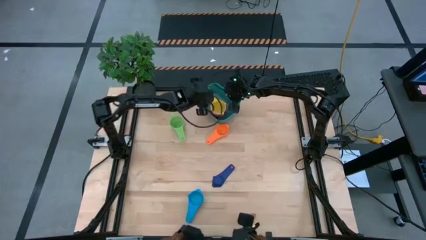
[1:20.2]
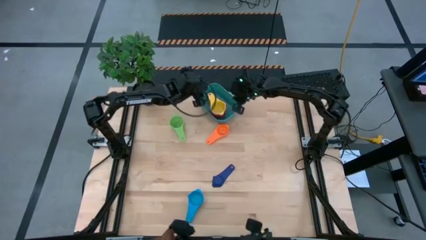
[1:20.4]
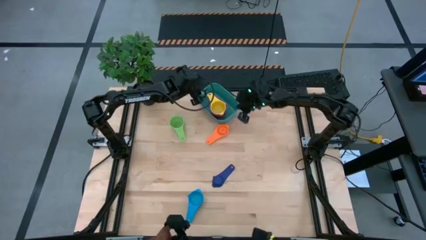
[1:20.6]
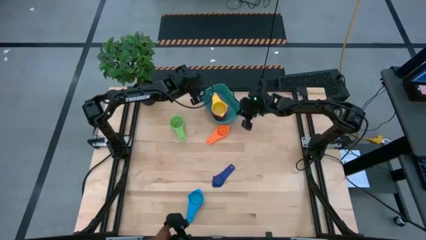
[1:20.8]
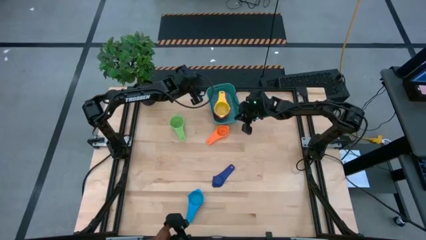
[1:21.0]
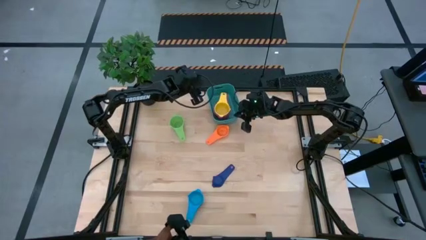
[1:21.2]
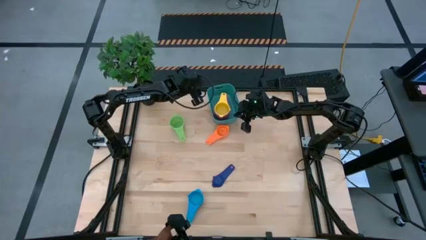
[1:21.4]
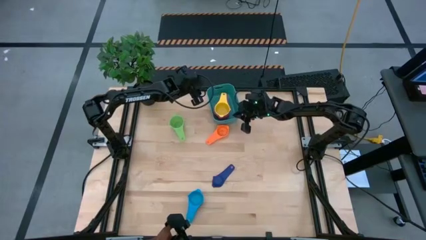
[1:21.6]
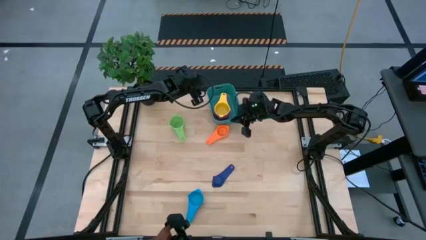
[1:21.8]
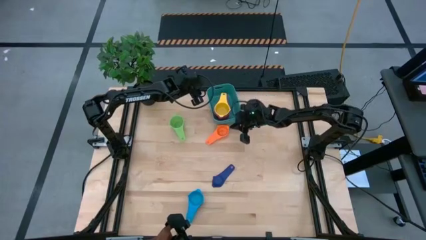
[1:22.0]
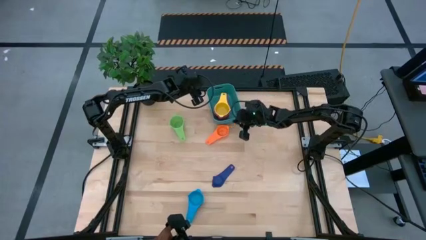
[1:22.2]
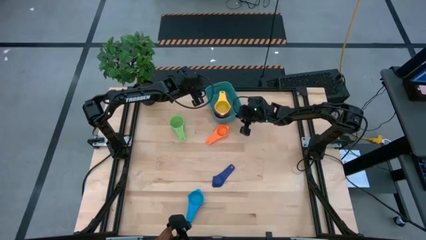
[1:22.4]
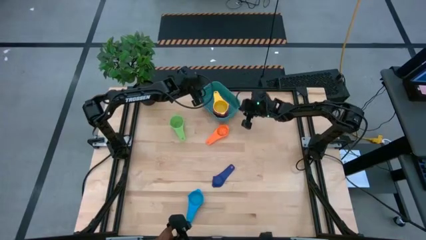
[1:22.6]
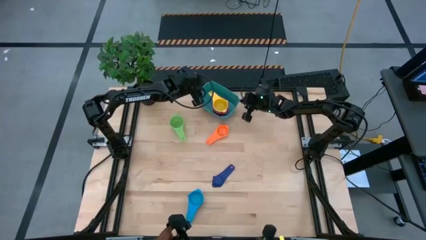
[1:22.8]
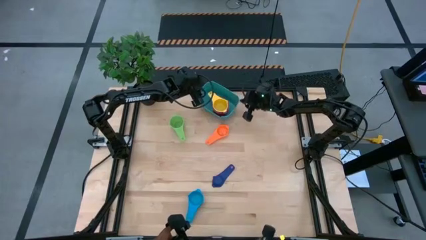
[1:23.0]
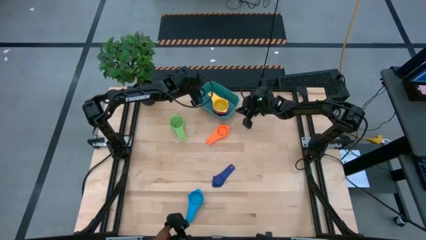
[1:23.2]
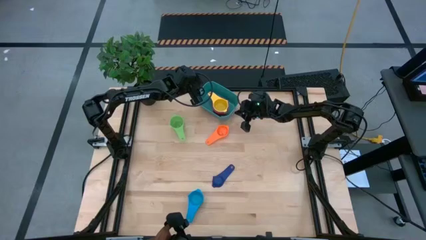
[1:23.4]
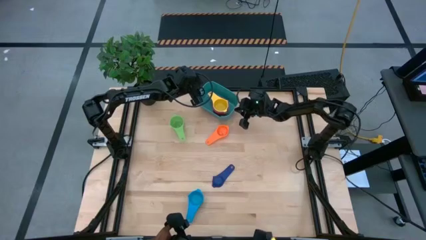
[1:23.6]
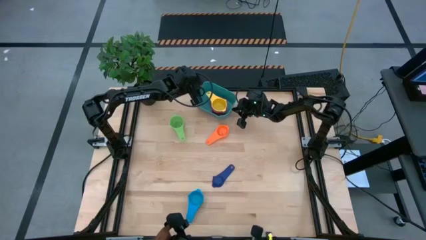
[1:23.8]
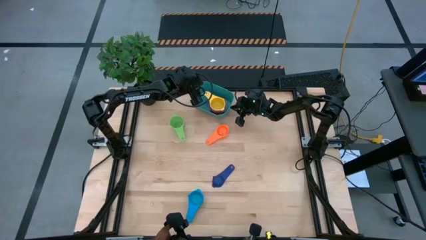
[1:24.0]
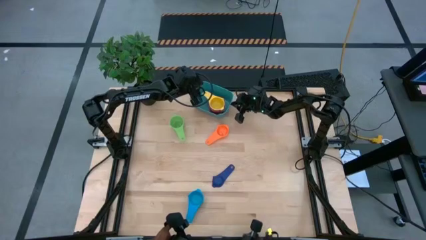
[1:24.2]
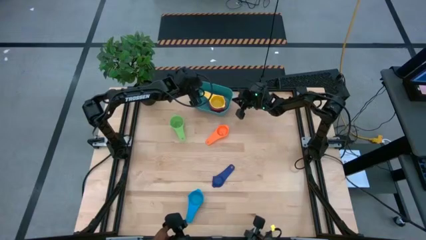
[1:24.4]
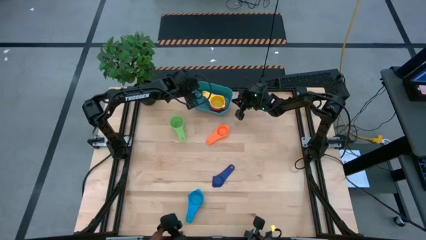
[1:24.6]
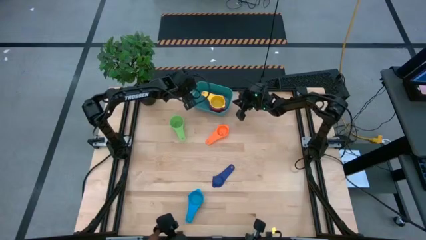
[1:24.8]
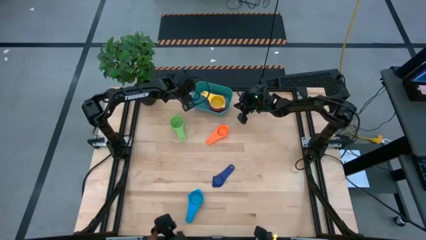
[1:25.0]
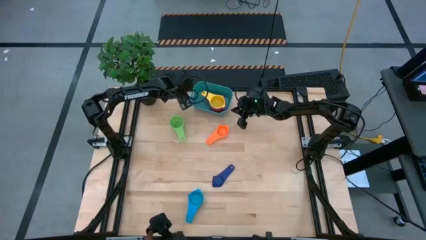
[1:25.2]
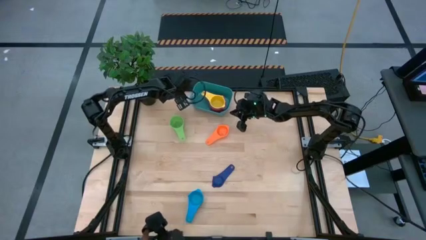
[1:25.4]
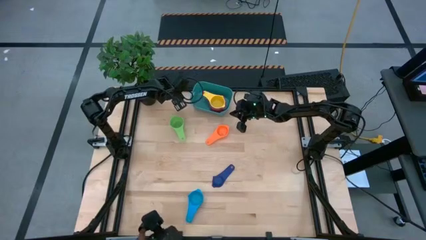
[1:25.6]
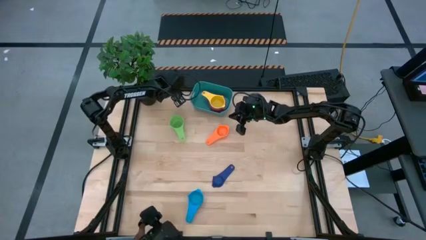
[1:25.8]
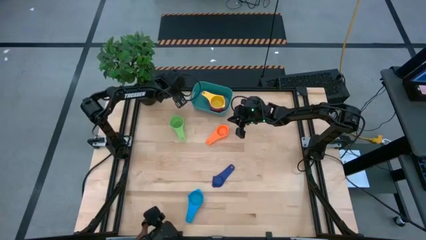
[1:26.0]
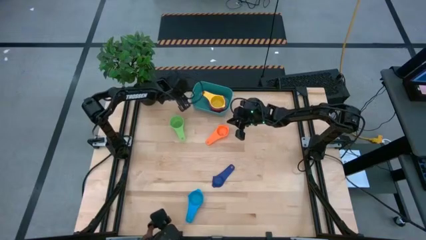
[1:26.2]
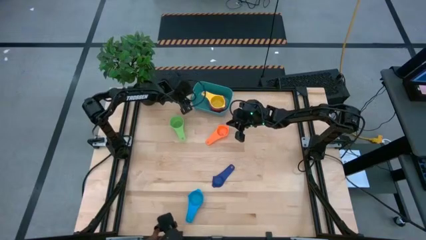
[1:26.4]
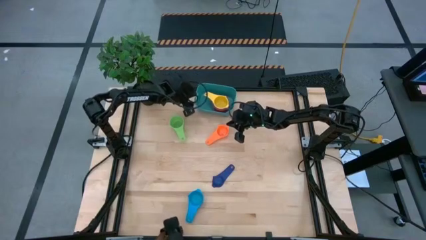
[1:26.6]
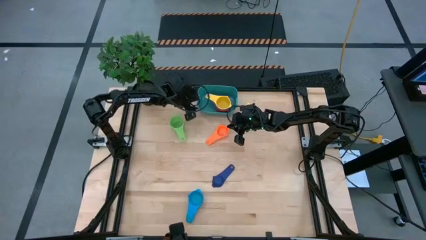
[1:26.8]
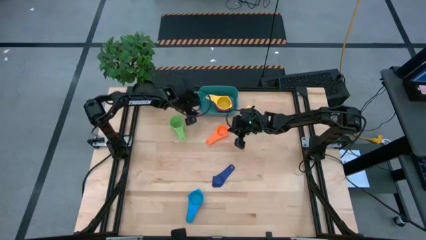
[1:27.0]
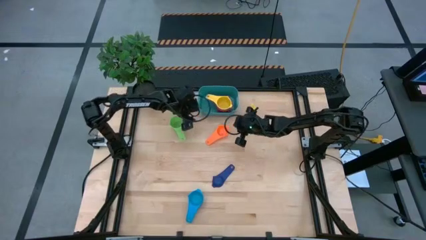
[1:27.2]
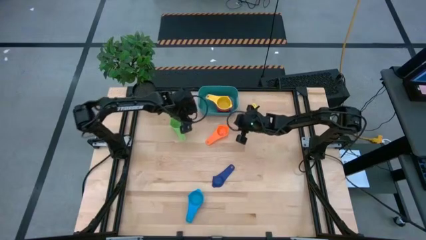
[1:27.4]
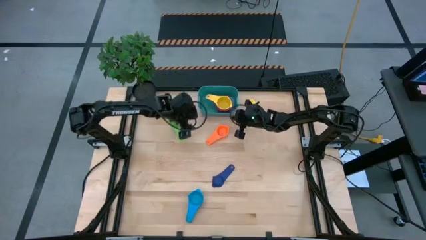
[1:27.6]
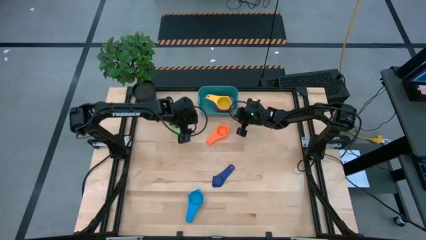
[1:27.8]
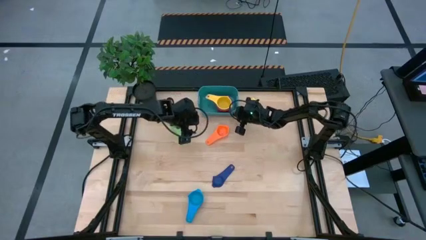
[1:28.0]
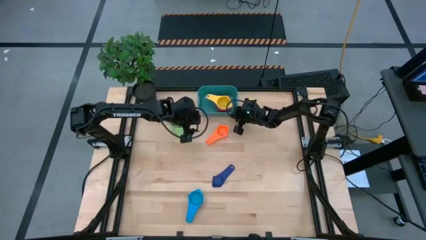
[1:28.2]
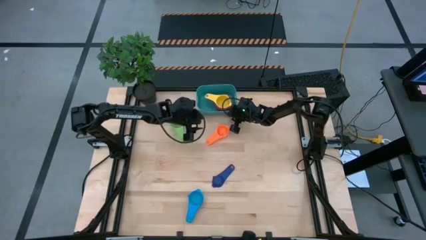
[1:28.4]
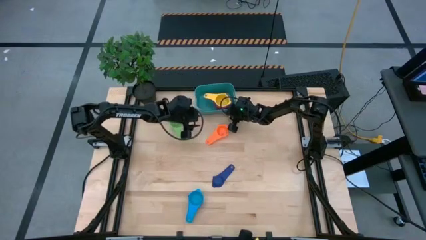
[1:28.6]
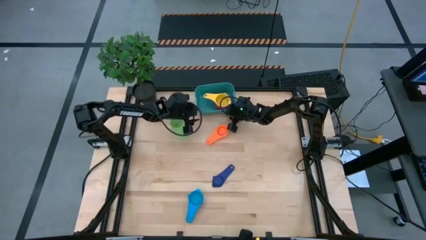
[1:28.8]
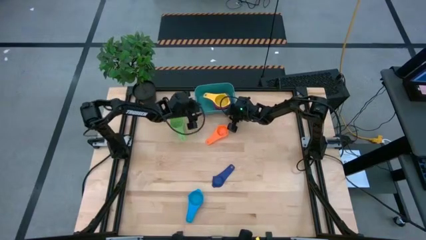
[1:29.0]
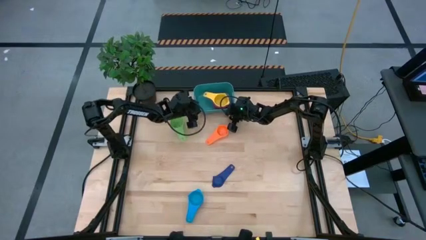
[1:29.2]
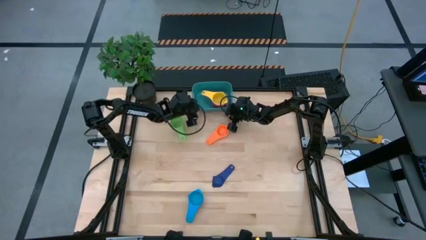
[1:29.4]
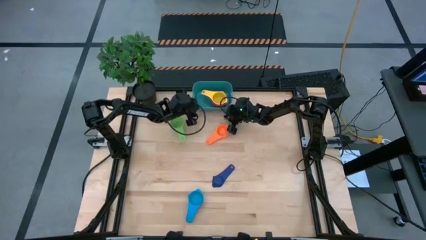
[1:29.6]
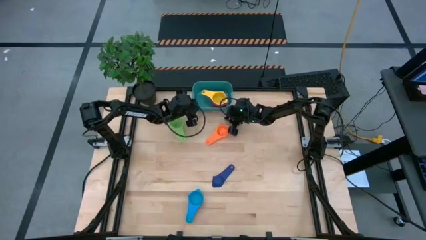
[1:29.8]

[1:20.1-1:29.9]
Task: Nest measuring cups in basket
Adjust the blue bin on the table

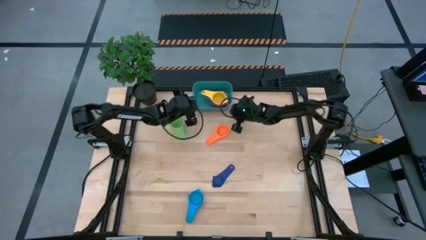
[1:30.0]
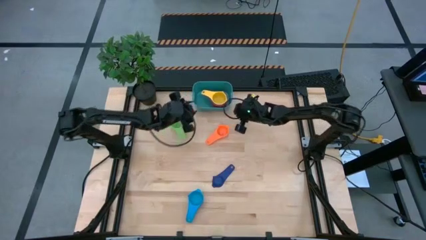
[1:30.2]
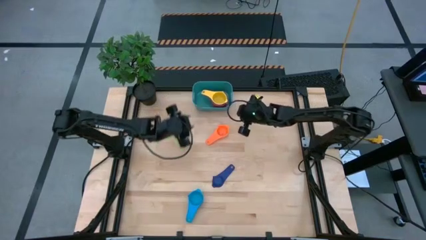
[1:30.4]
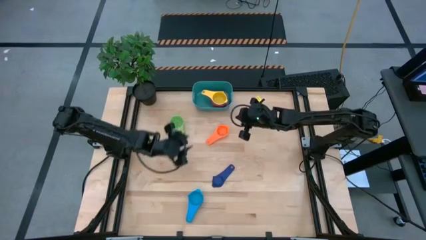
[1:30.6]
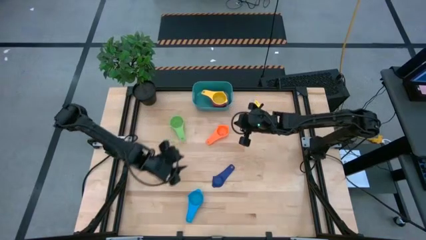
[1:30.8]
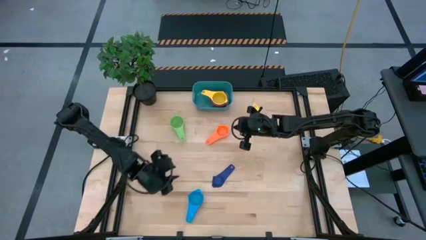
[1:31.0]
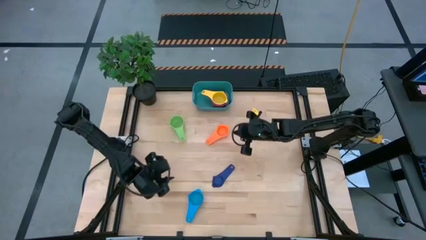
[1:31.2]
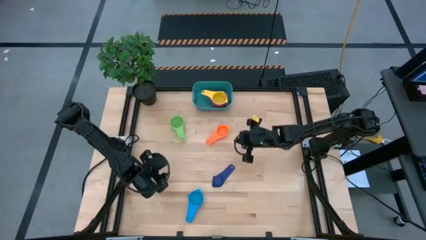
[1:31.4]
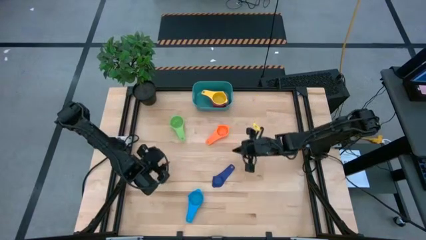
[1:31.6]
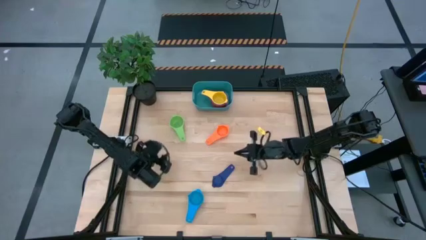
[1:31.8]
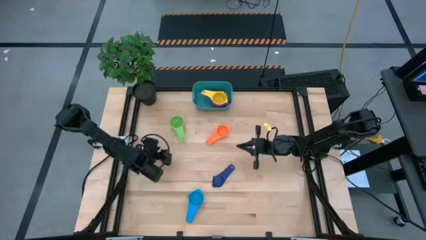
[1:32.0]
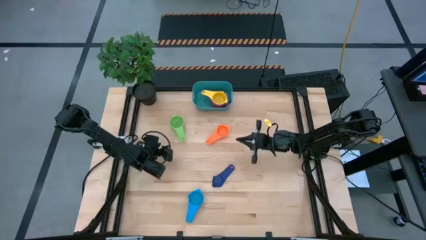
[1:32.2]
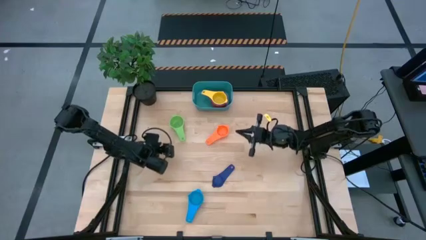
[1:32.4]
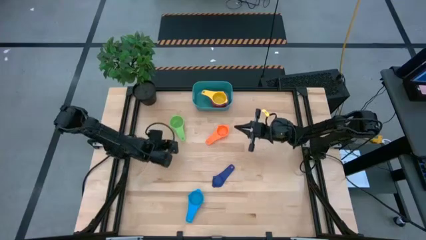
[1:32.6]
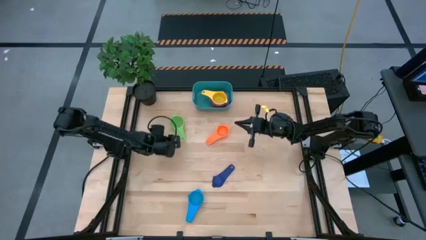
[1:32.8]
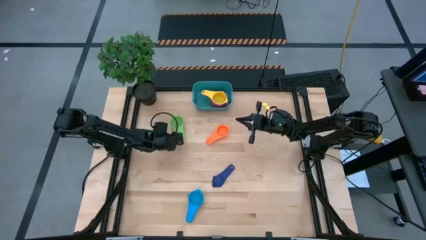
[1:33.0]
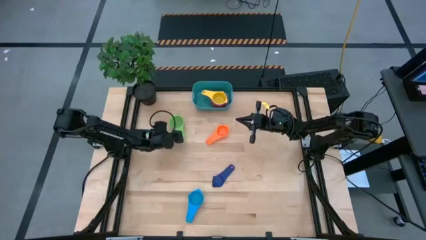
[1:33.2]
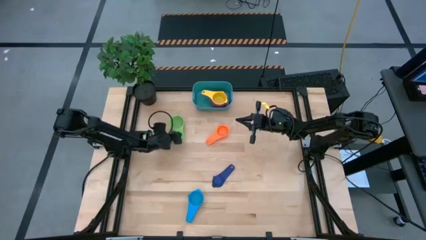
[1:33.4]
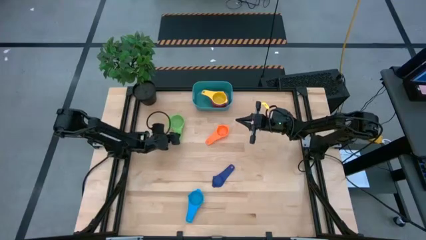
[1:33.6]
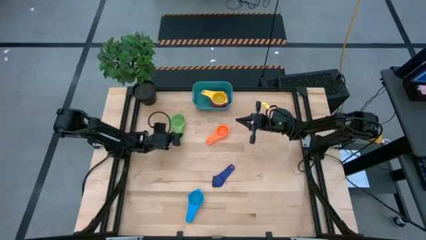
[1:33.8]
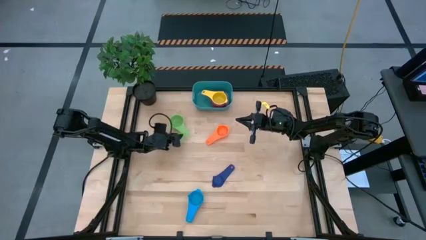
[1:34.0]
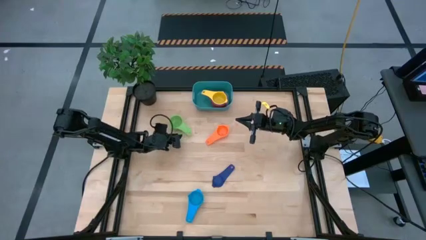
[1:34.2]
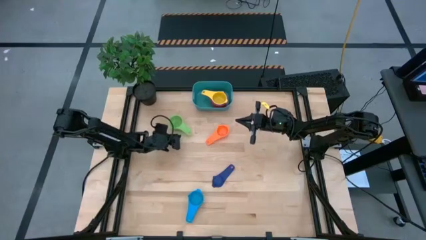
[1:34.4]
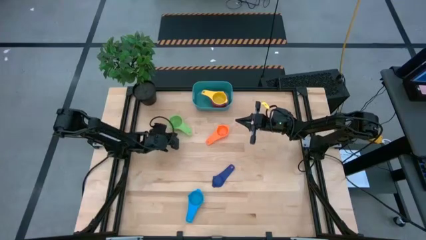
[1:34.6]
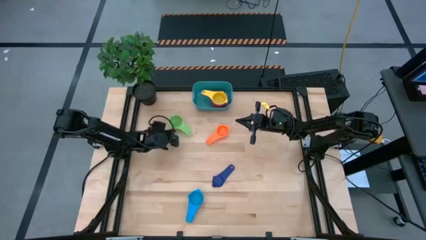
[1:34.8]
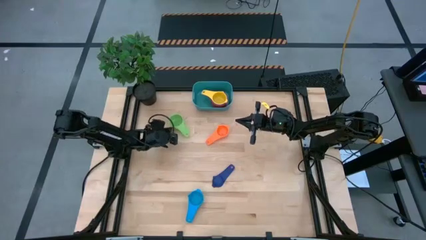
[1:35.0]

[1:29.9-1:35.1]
Stack the green measuring cup on top of the yellow measuring cup in the blue bin
